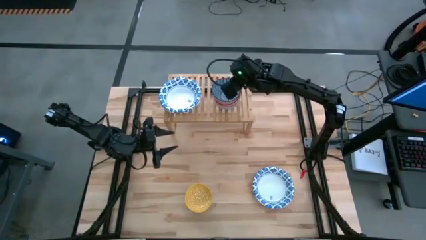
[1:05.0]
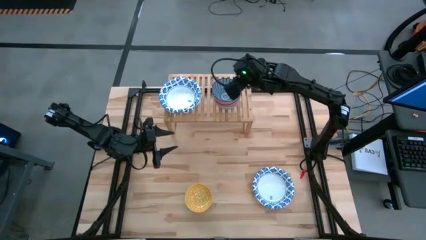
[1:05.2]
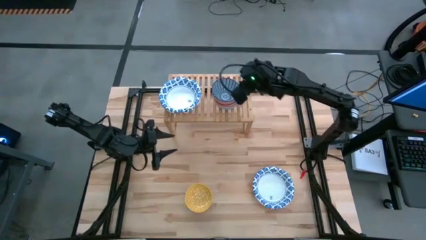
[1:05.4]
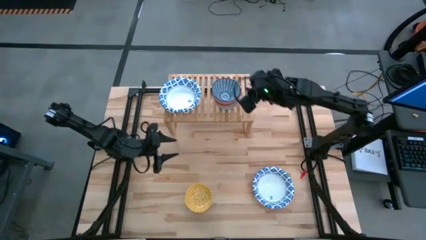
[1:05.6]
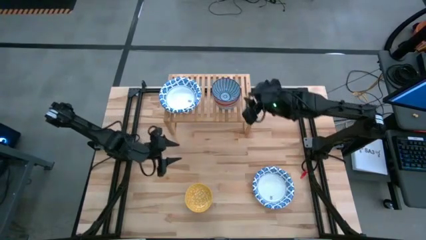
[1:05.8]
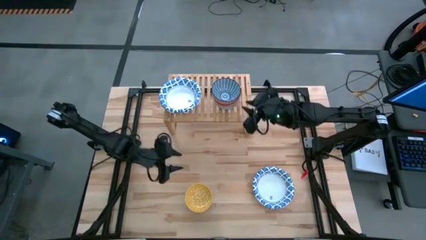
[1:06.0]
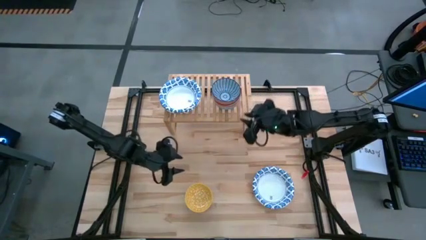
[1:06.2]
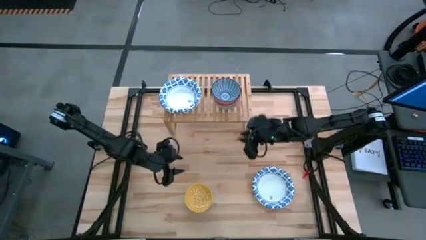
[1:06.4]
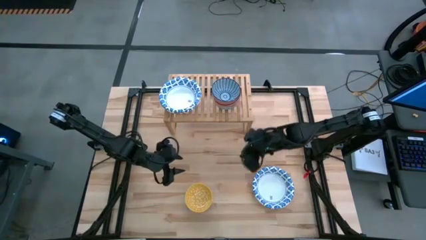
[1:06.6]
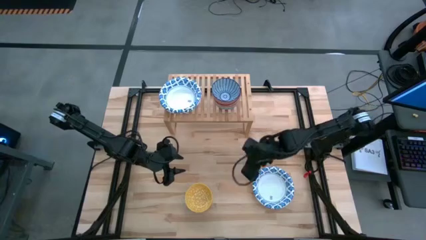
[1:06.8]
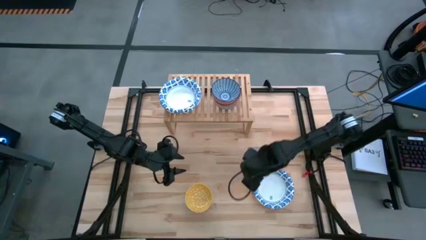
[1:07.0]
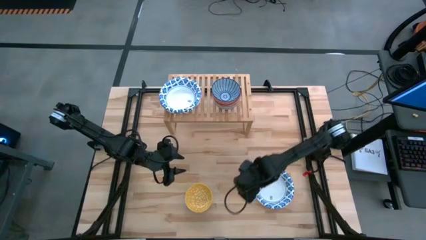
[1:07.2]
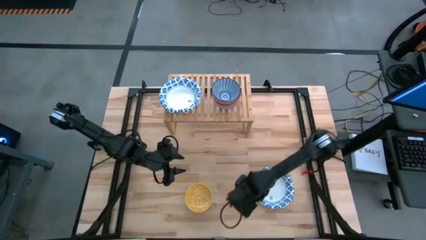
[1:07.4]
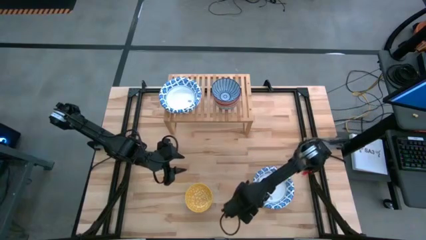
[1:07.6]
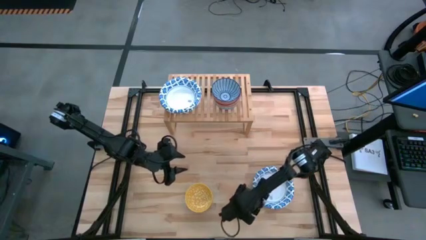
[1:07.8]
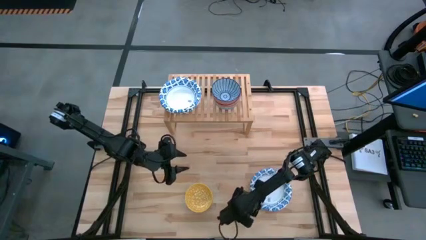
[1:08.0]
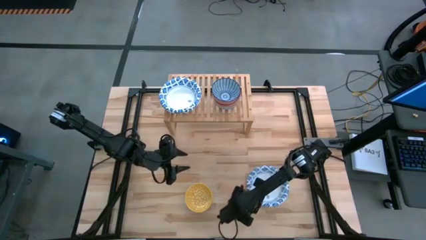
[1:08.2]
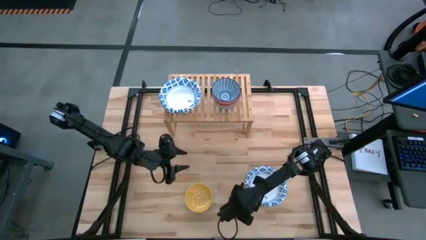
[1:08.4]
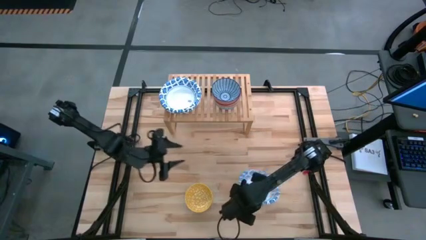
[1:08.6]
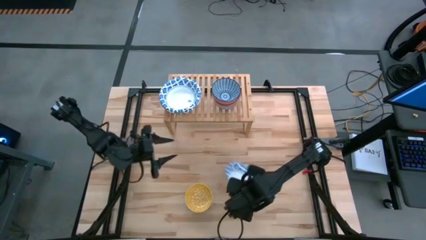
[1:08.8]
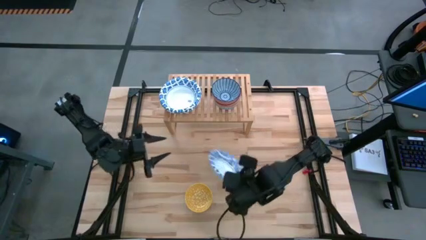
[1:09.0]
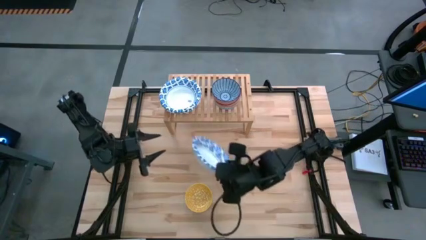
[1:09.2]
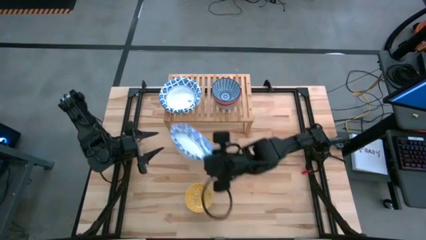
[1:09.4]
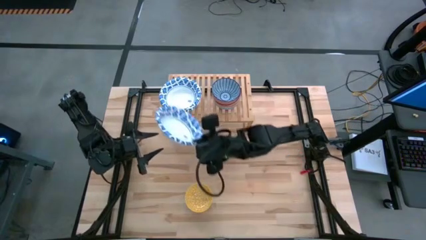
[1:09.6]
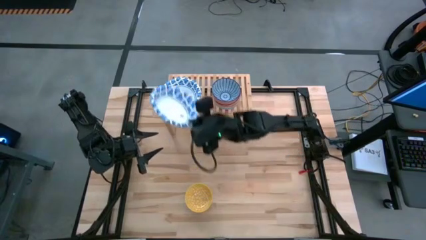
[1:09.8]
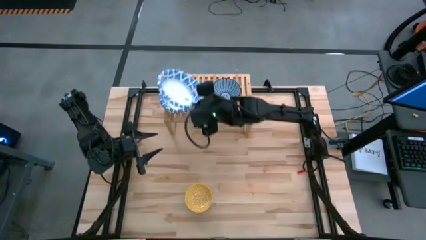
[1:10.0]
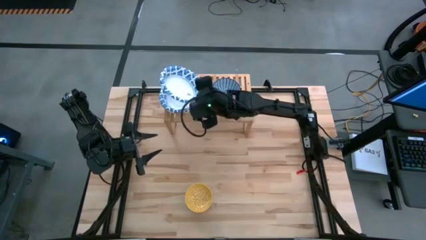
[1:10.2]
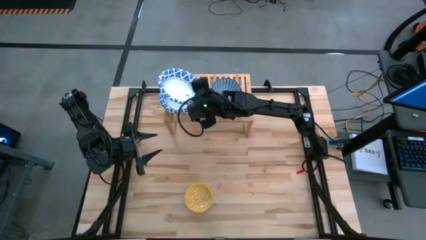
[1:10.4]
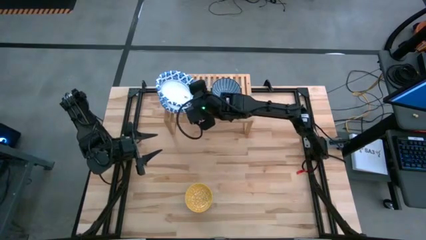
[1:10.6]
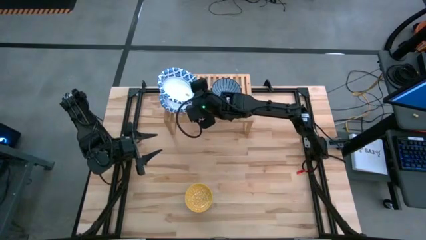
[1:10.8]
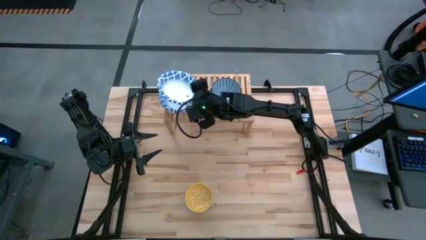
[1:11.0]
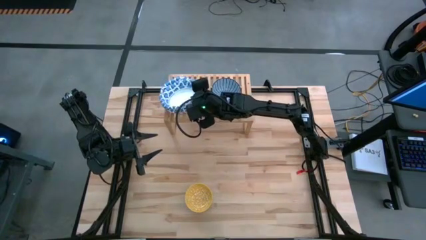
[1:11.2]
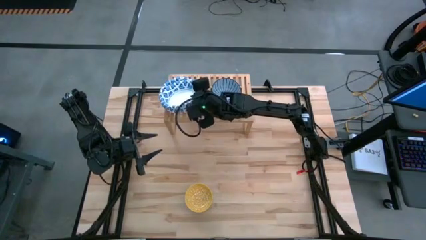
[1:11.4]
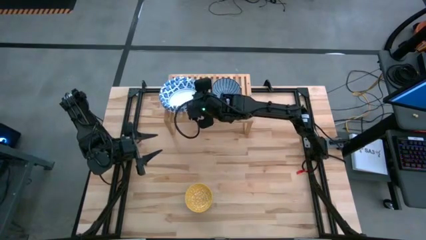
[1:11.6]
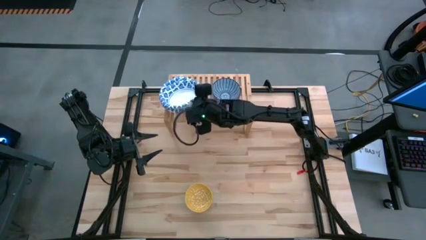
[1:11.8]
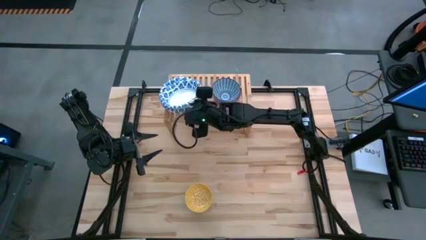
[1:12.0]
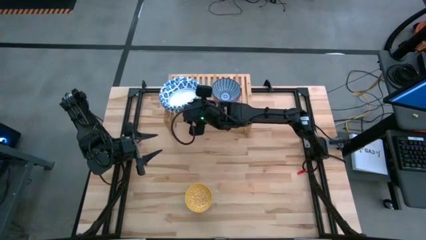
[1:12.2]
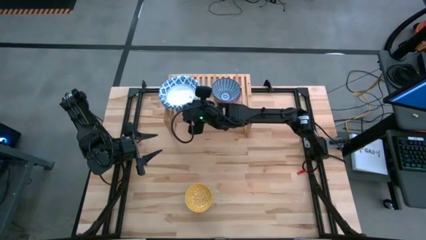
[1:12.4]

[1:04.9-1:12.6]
Task: Place and stack bowls onto a shelf
Stack the white patterned bowl on top of the white patterned bowl on the shelf

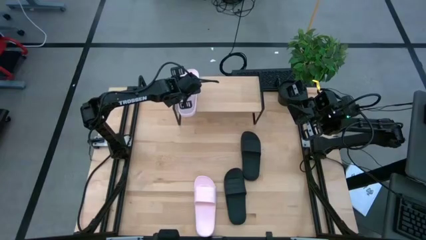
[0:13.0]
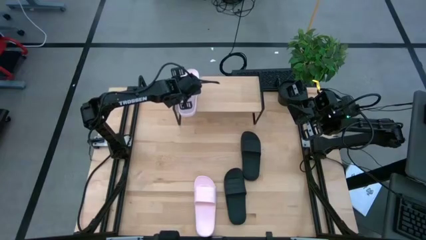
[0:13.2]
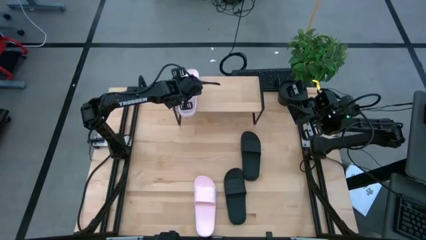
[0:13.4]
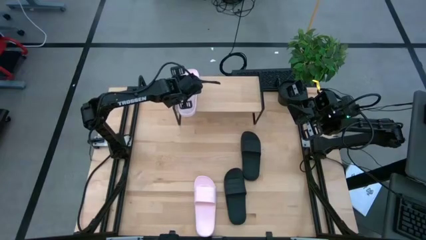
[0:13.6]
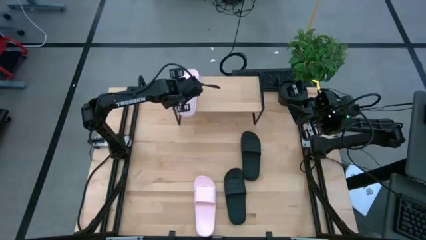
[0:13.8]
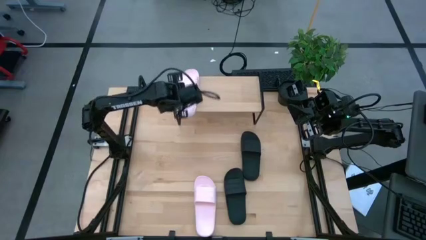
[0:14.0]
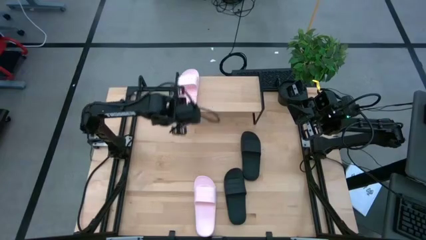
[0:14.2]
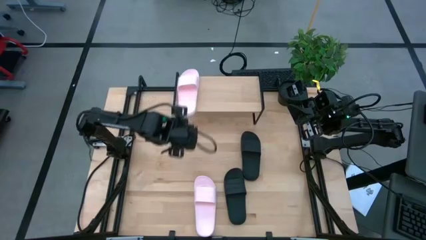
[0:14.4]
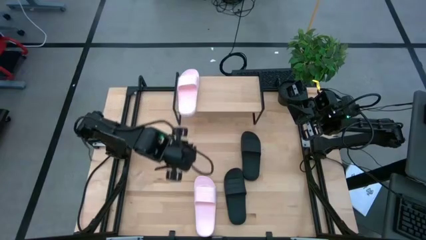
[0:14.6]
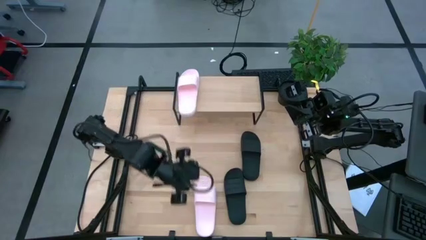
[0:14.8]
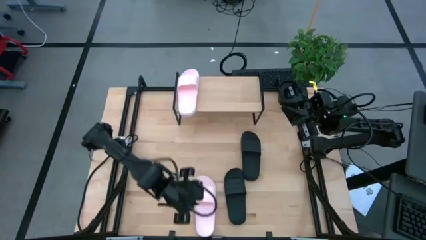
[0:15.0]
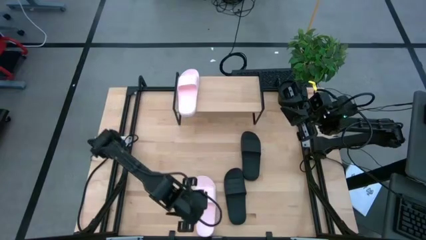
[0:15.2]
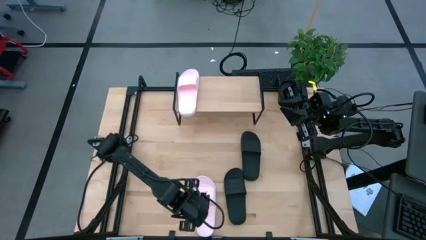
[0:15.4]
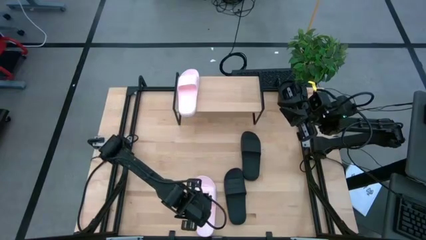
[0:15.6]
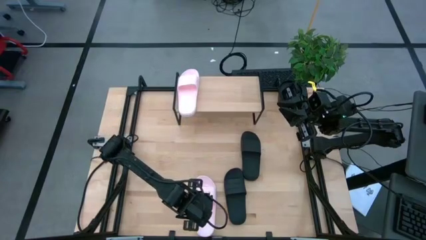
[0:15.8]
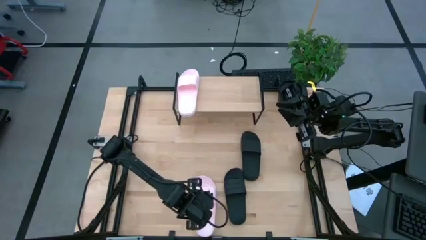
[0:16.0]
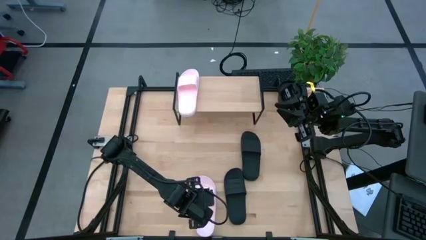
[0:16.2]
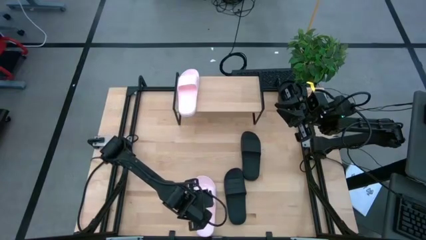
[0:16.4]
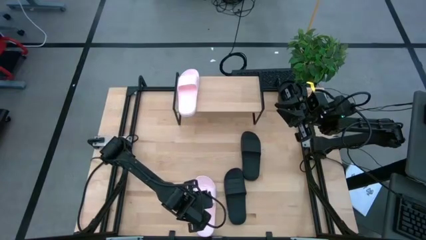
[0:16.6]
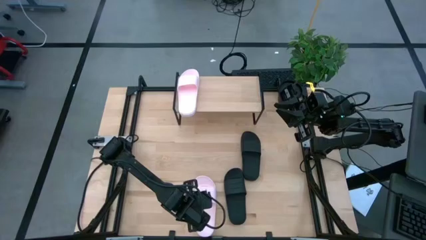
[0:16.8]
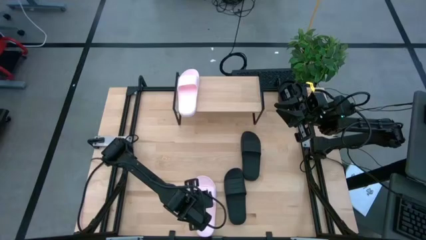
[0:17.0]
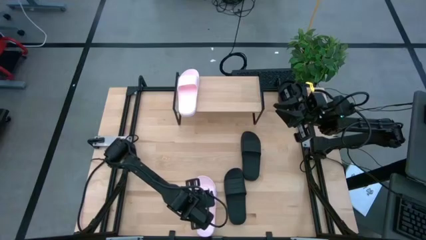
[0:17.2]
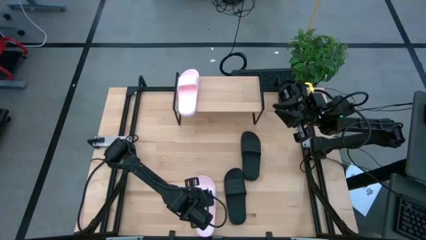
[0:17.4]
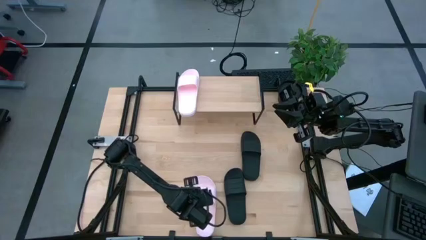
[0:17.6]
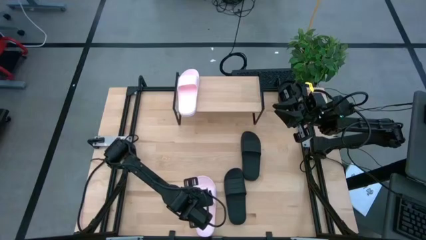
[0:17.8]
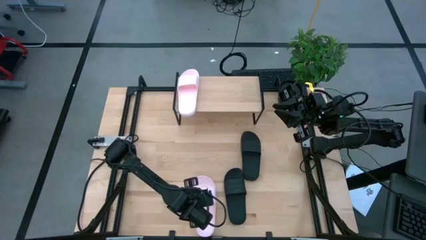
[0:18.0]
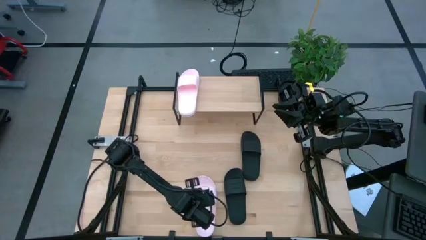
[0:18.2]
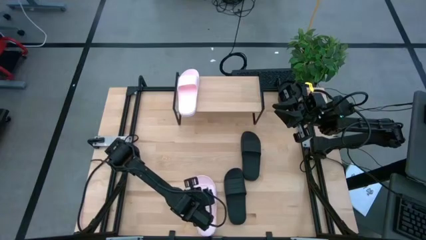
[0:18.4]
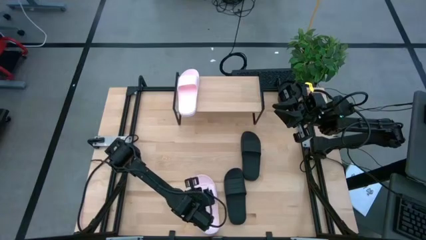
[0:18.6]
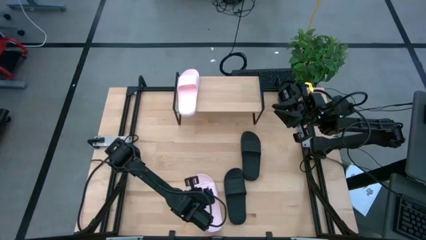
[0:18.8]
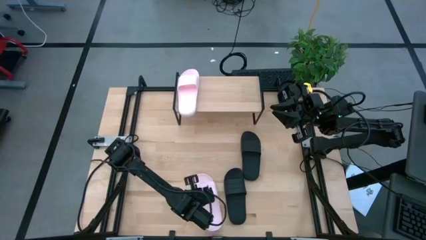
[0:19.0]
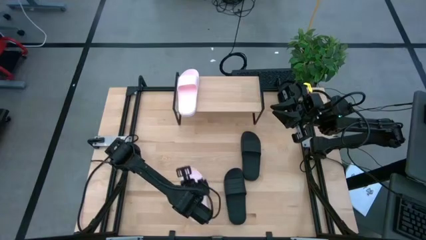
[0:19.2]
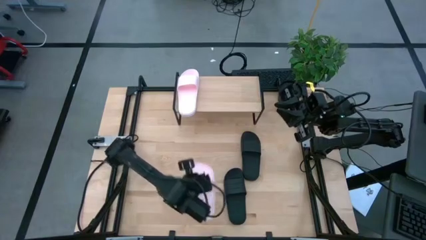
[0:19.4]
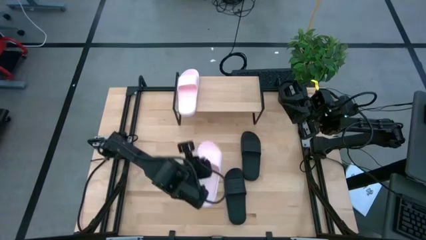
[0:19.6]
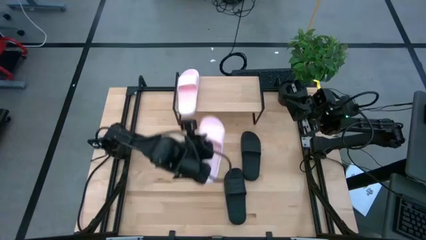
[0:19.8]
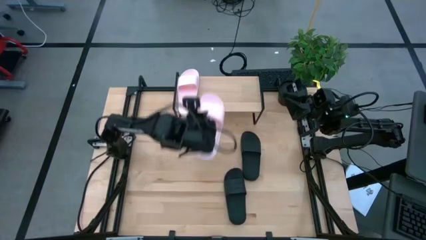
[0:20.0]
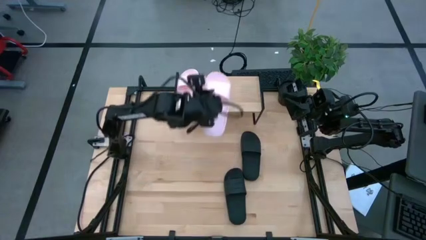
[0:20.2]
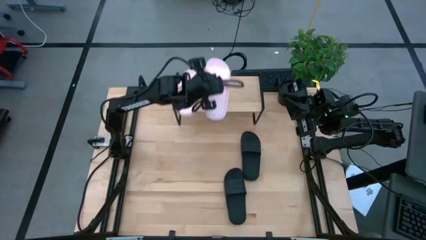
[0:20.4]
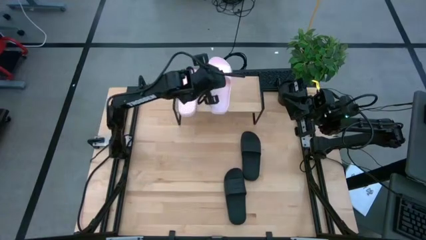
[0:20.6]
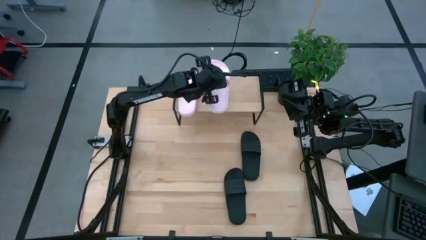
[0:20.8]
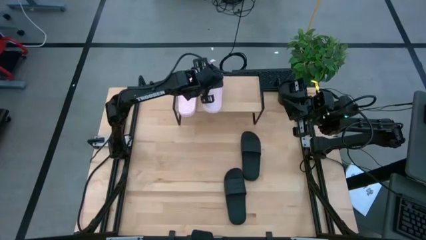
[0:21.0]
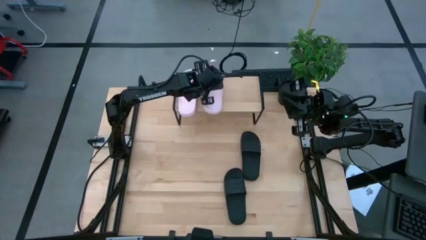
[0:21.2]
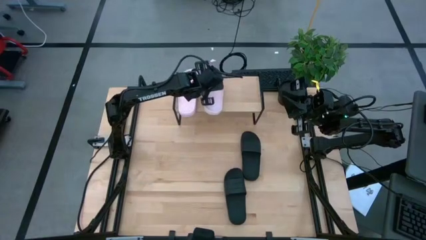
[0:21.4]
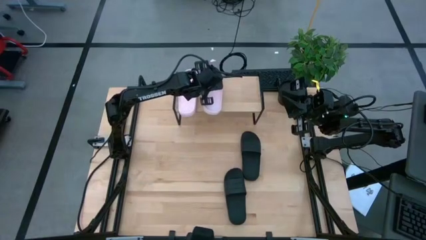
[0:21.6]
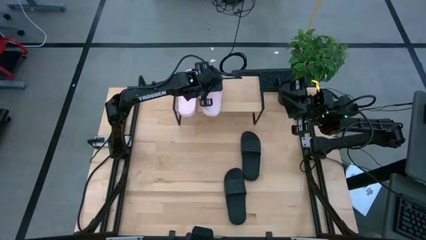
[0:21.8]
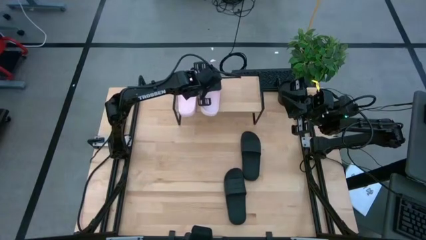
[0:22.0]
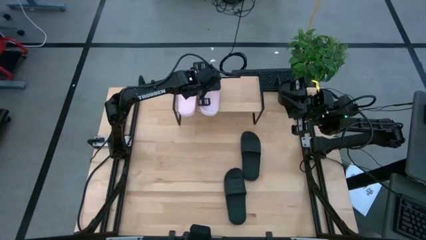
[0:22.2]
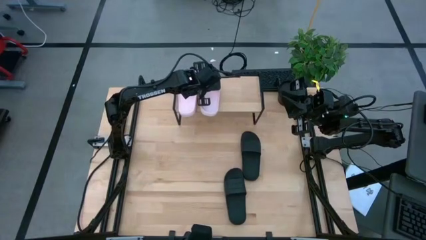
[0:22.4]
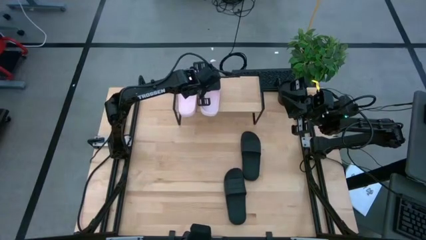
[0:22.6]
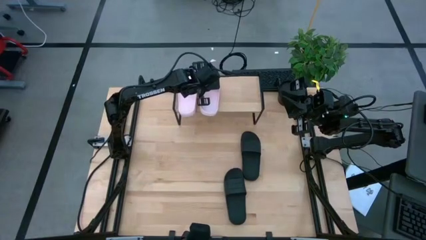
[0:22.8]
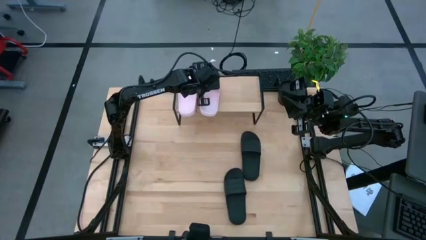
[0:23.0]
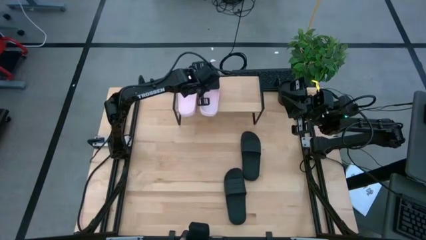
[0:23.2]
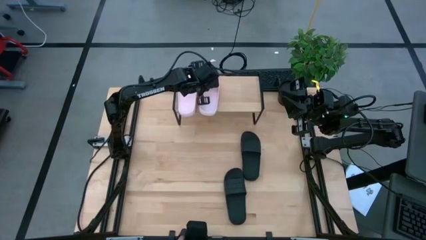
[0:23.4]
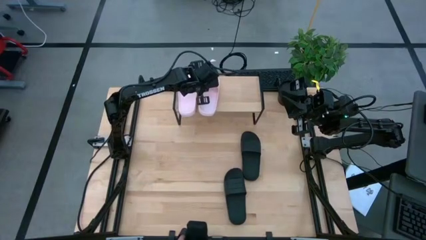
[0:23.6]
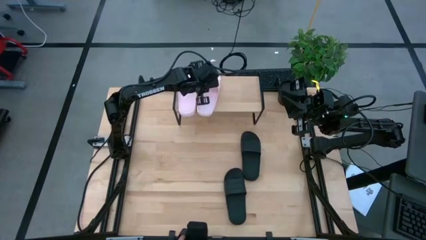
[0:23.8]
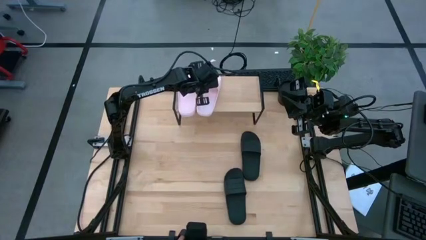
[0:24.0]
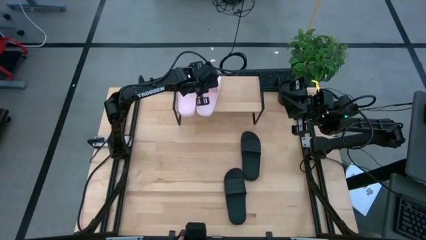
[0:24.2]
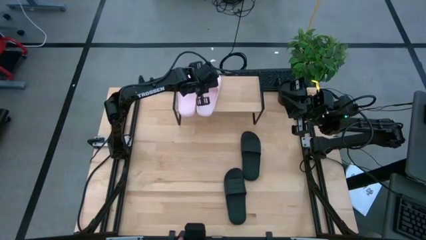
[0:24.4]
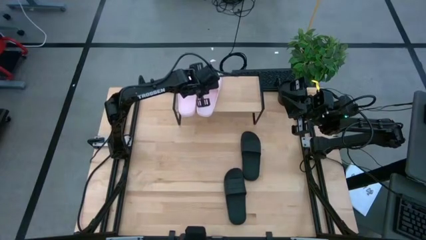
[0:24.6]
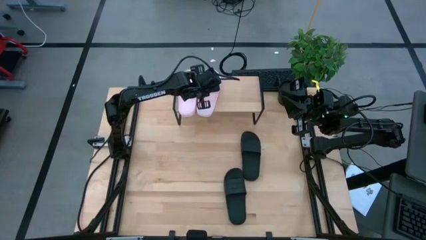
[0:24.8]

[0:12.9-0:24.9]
Task: Pick and place slides into the shelf
Put the pink slipper on the shelf
